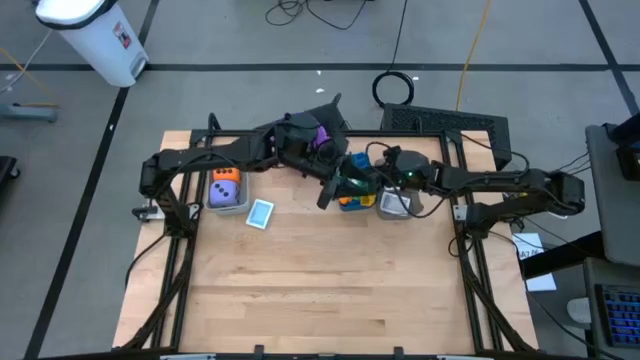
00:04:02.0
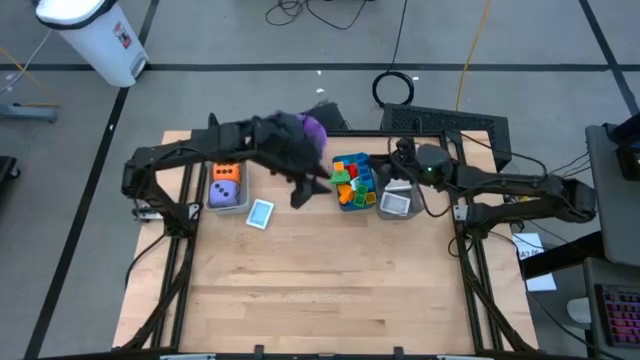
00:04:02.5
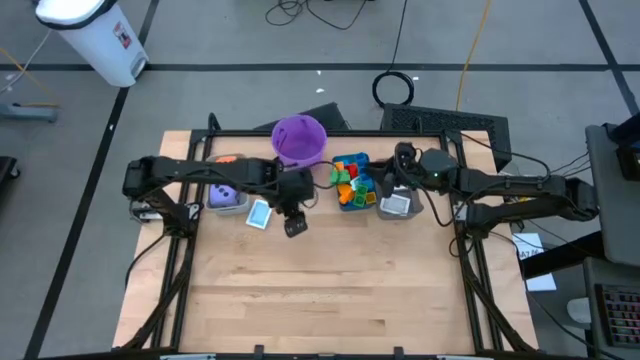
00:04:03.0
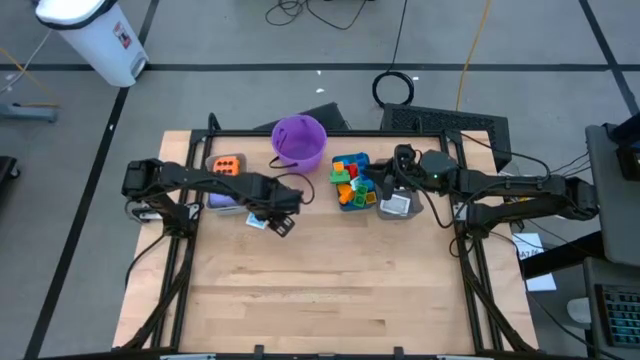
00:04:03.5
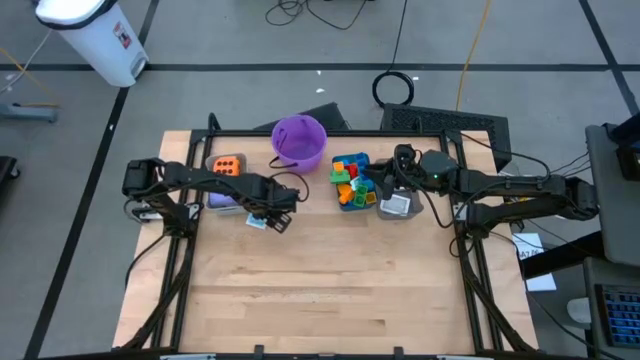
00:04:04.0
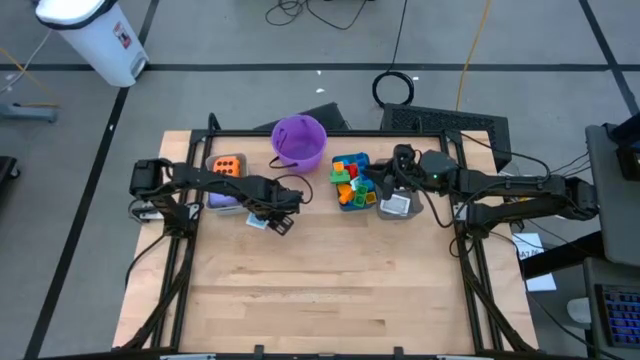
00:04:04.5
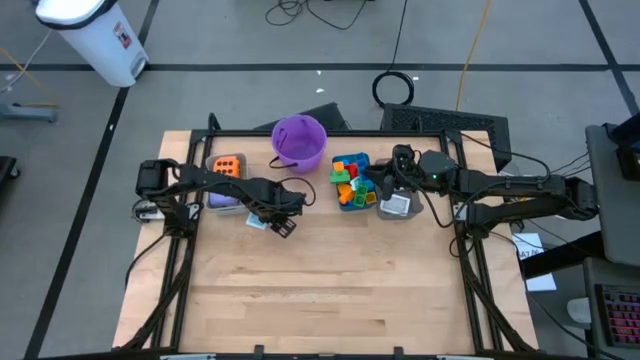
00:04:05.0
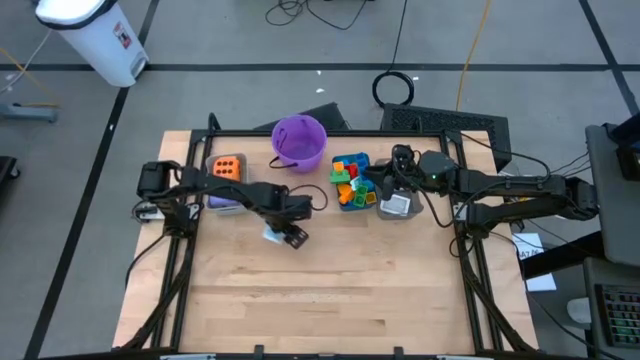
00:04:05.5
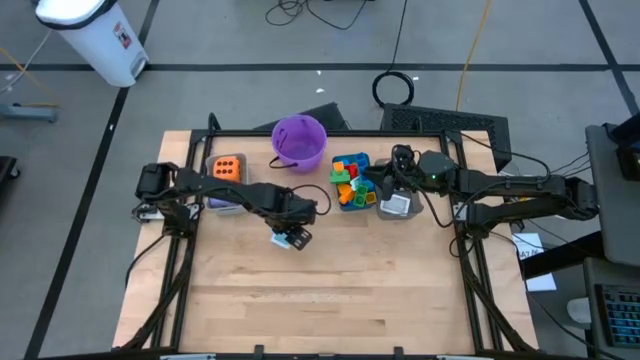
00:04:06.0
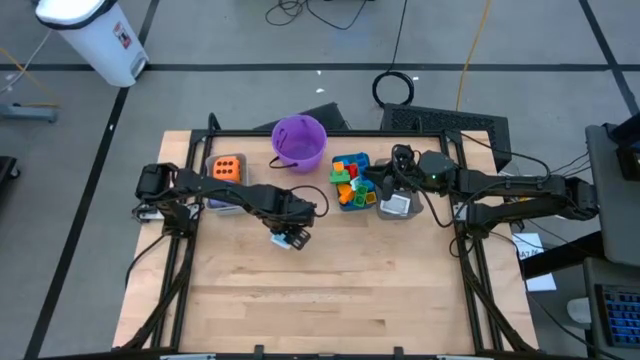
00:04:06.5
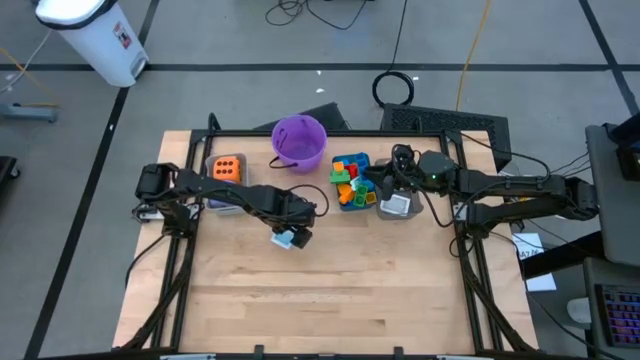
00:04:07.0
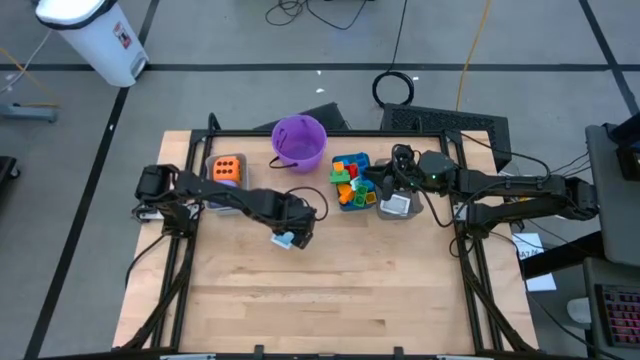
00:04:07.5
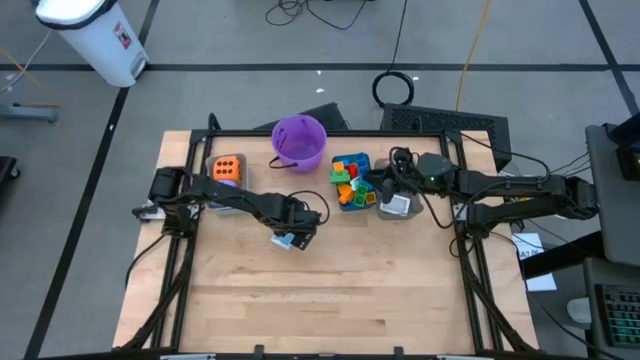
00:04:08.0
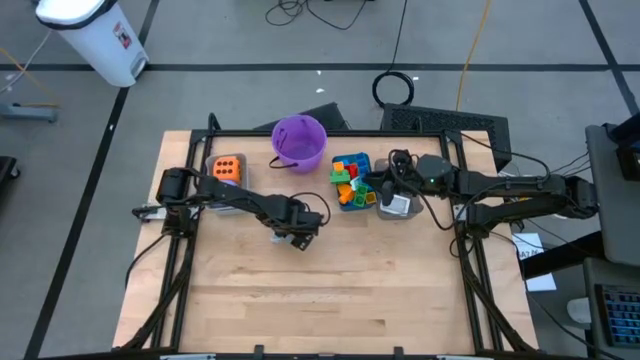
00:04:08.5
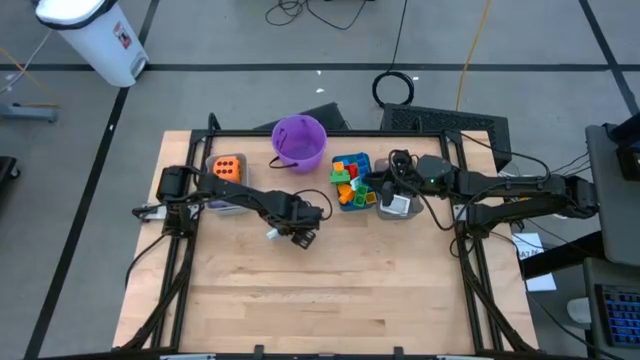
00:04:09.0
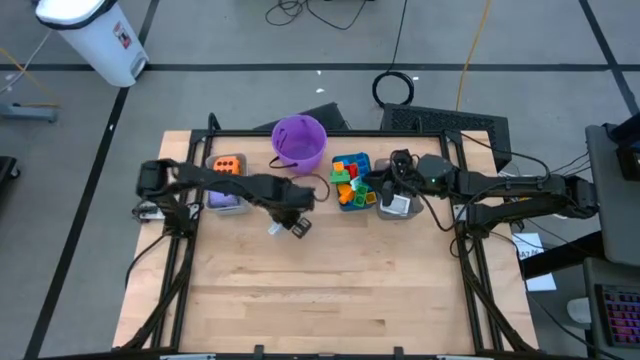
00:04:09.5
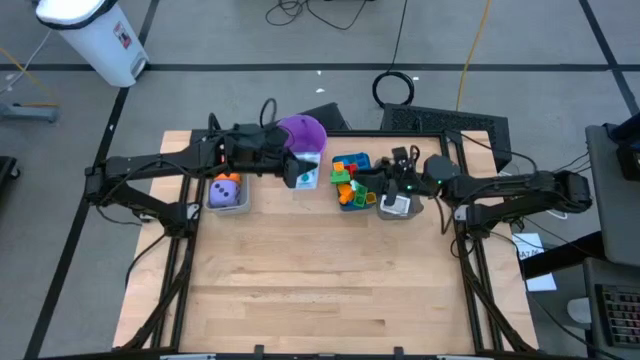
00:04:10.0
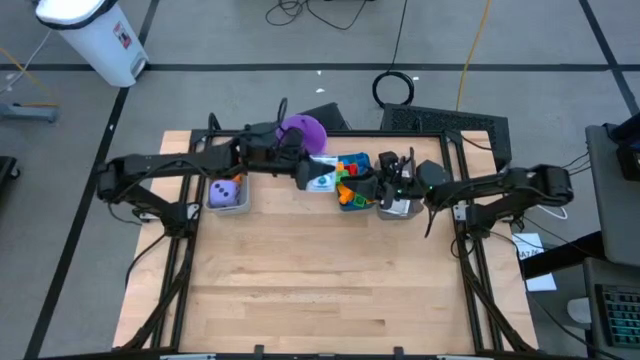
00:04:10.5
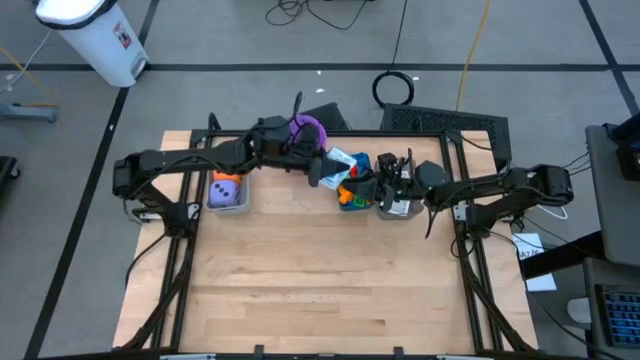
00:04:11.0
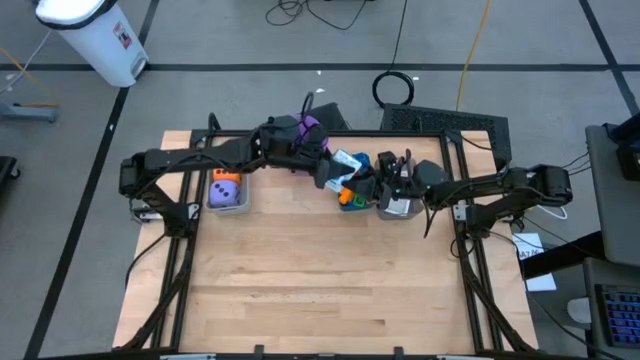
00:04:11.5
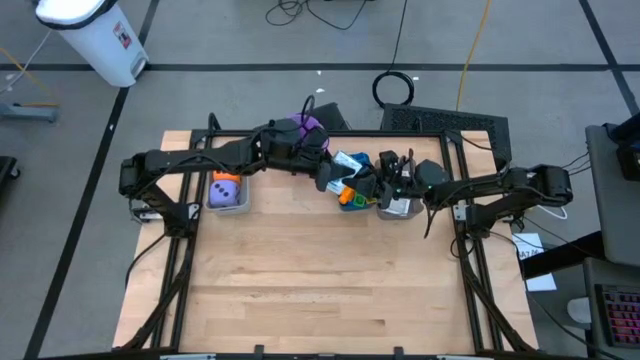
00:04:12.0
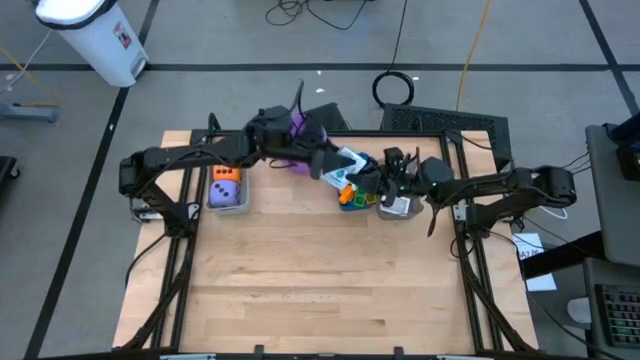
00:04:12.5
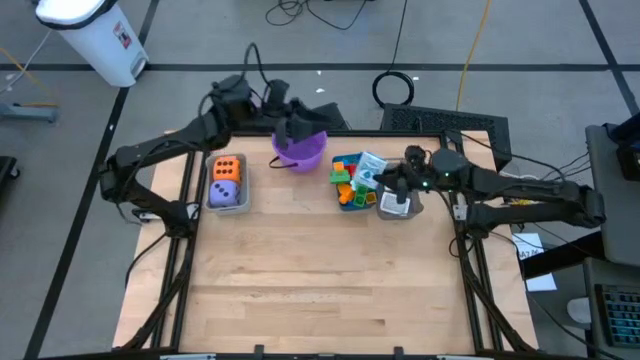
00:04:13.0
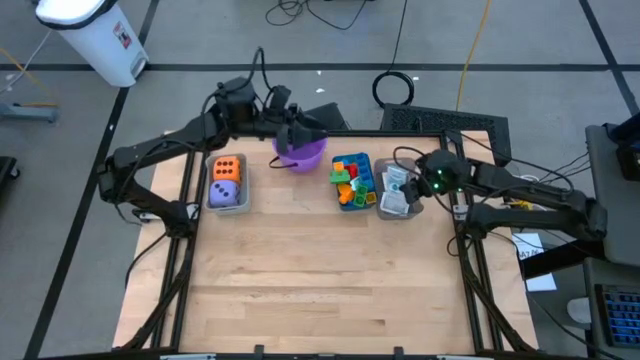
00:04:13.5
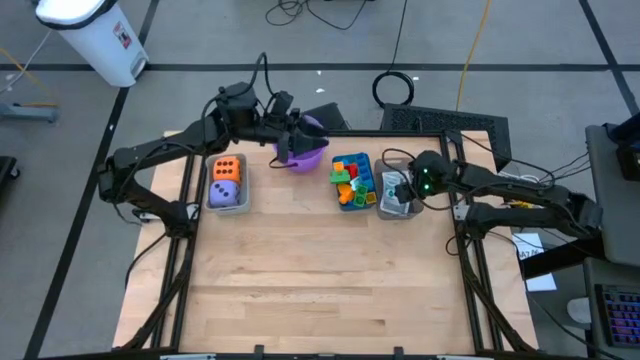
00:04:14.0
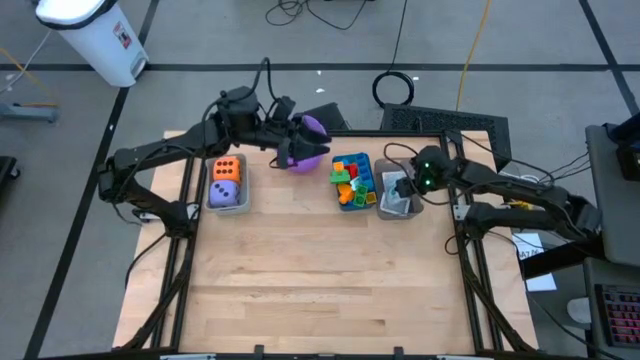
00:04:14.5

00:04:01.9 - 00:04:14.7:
Task: Pick & Place Toys
Put the blue deck of cards into the black bin

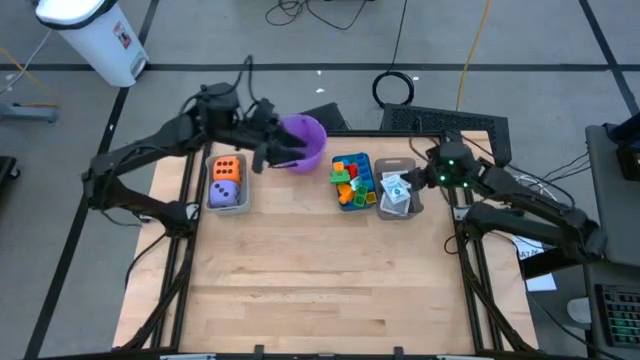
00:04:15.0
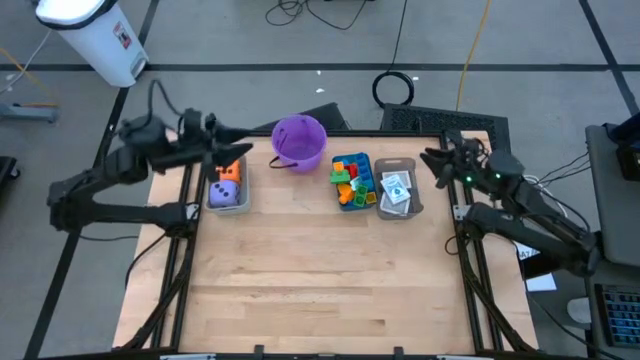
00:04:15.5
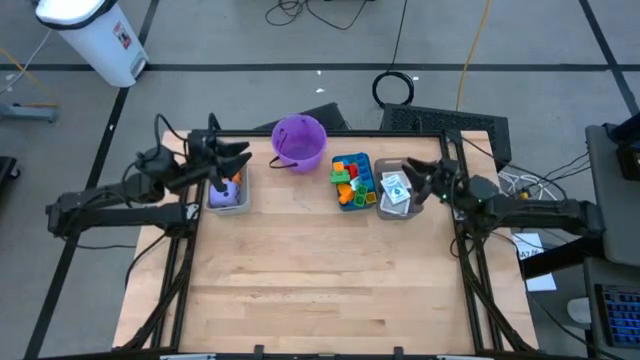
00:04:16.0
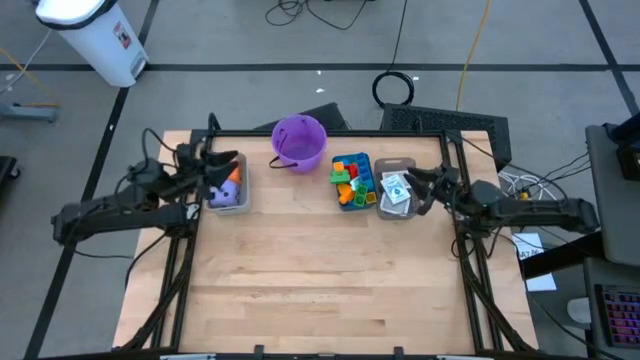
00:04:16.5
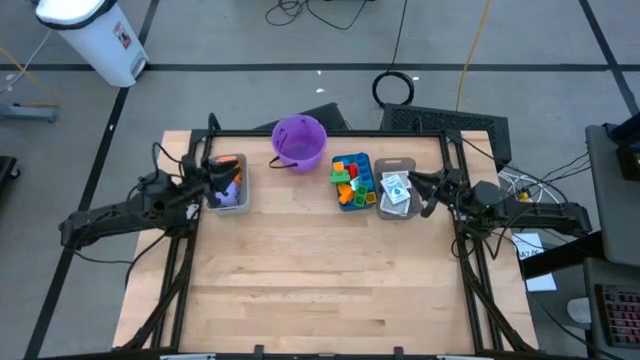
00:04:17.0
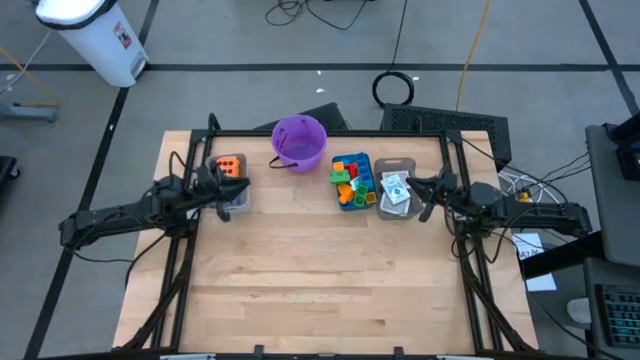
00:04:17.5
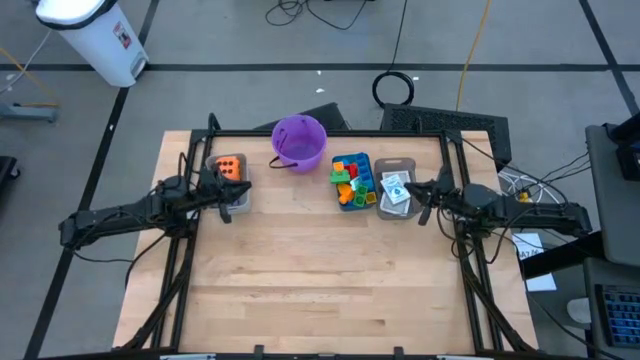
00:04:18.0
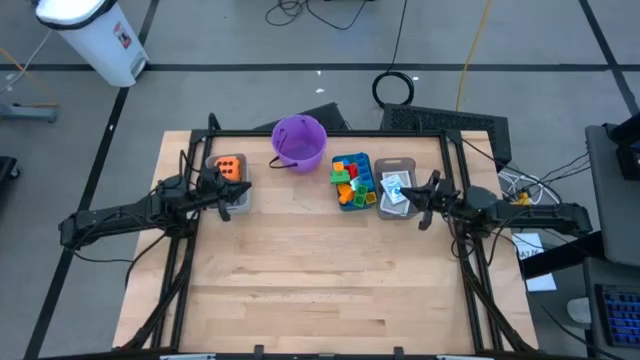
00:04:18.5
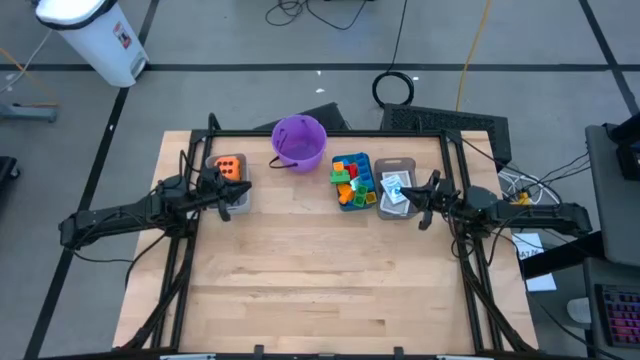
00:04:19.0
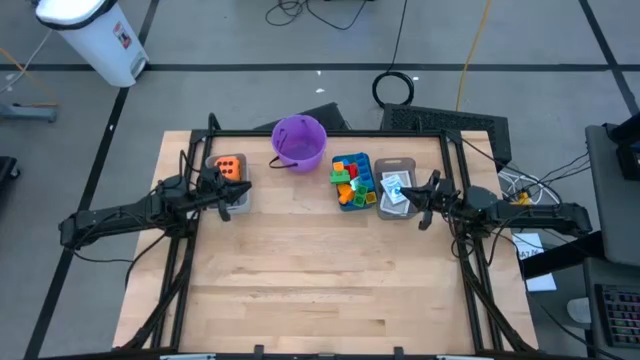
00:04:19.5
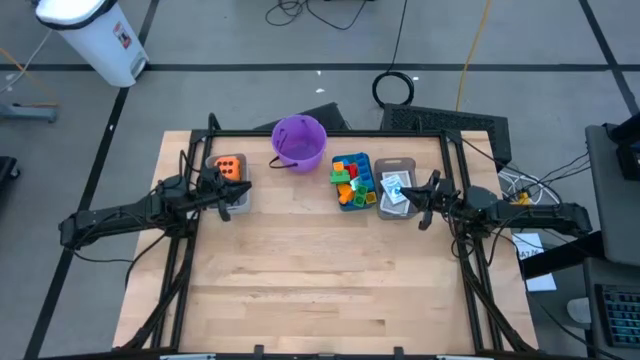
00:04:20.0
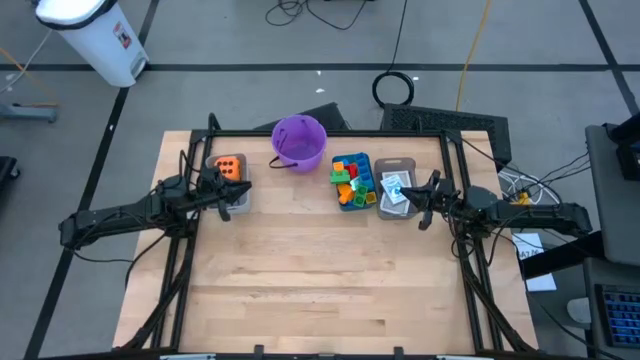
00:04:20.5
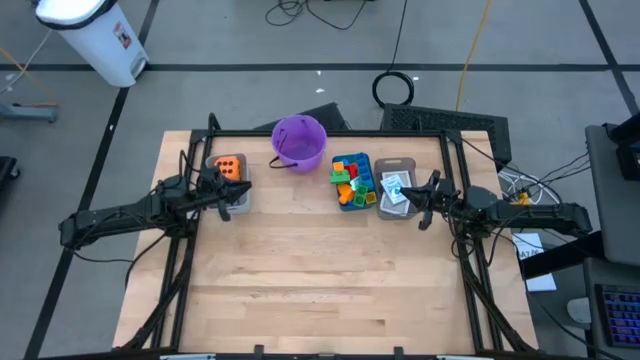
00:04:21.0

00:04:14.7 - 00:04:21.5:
Return to Home Position
